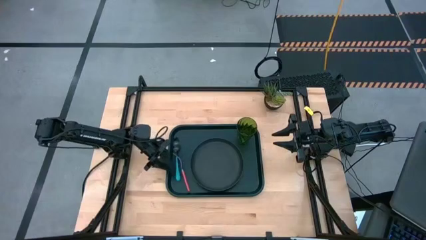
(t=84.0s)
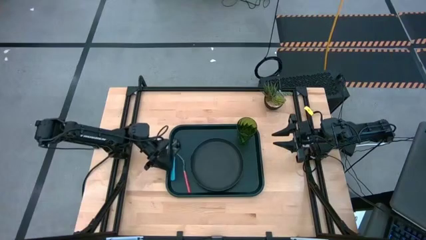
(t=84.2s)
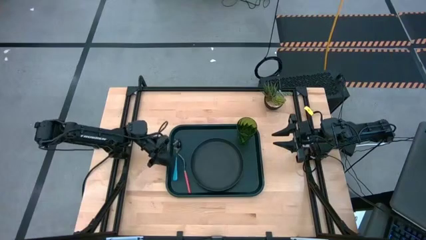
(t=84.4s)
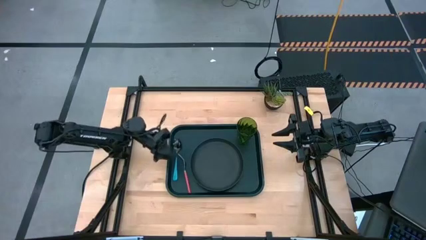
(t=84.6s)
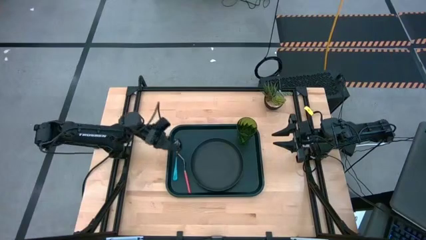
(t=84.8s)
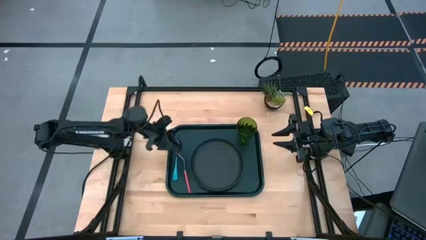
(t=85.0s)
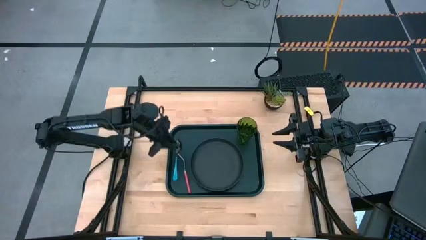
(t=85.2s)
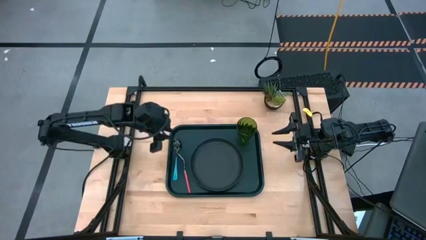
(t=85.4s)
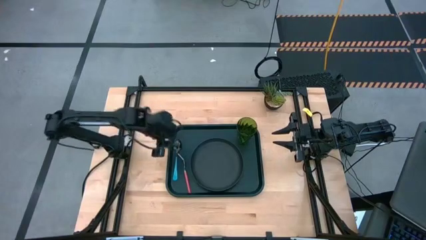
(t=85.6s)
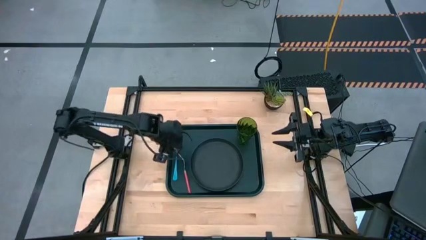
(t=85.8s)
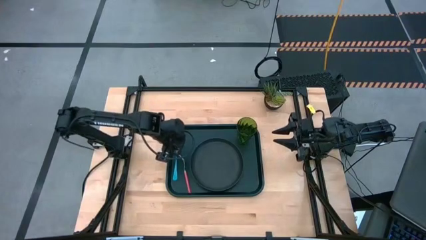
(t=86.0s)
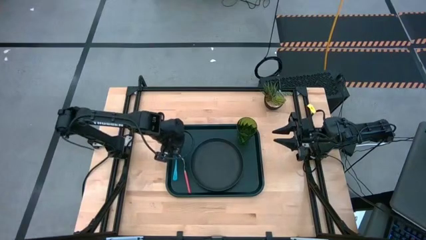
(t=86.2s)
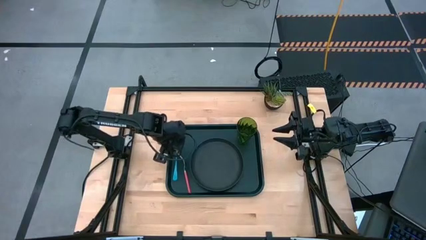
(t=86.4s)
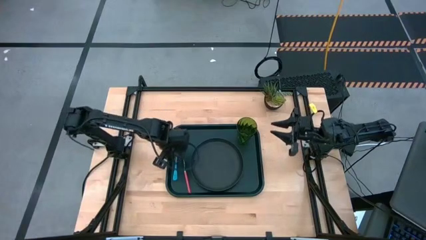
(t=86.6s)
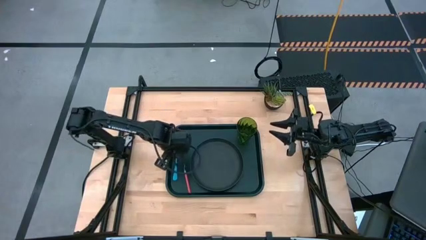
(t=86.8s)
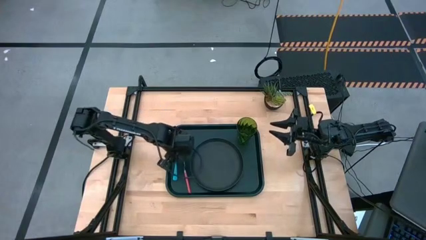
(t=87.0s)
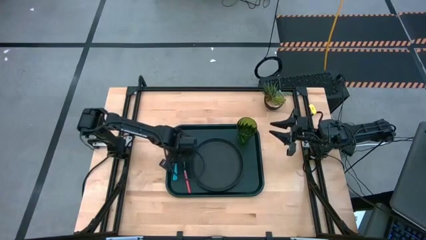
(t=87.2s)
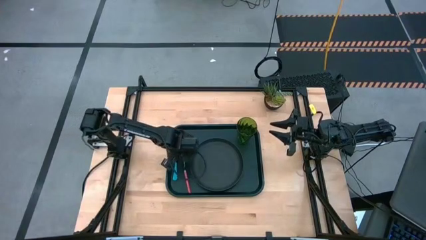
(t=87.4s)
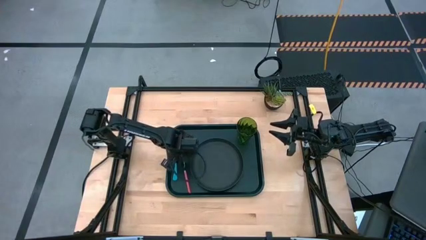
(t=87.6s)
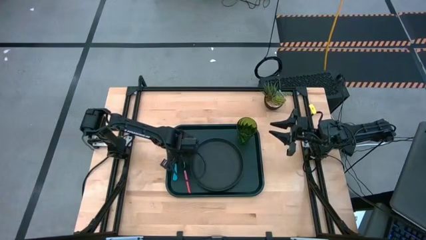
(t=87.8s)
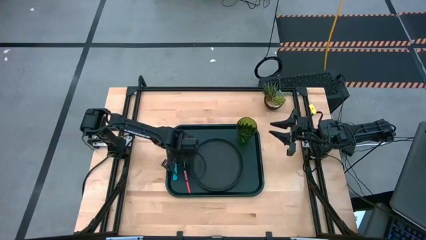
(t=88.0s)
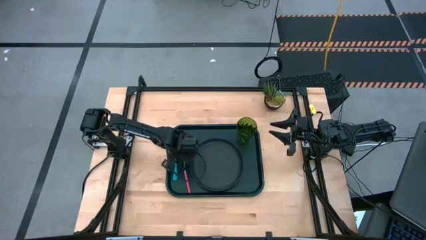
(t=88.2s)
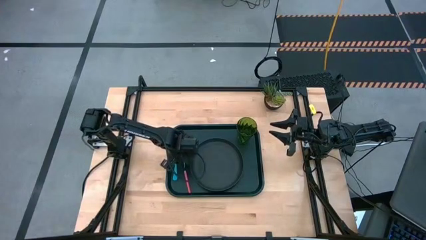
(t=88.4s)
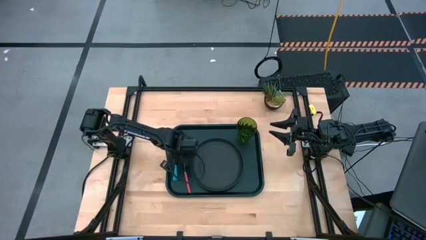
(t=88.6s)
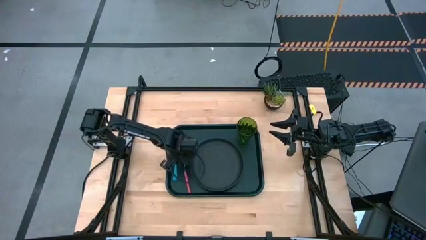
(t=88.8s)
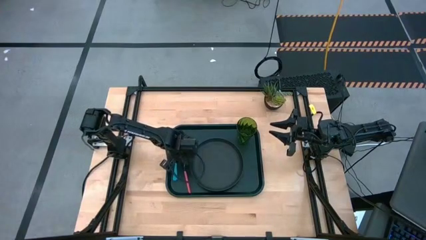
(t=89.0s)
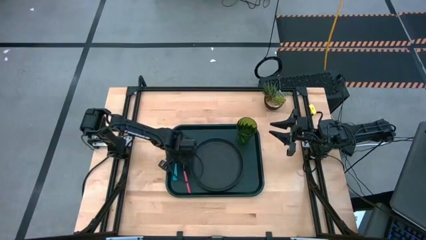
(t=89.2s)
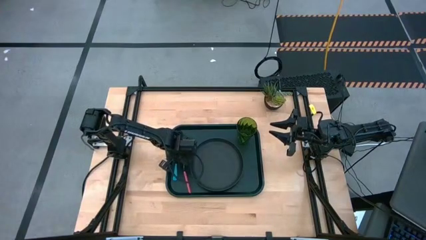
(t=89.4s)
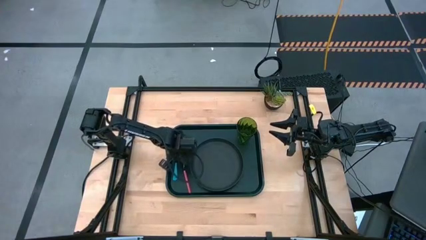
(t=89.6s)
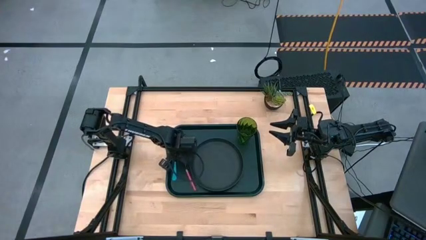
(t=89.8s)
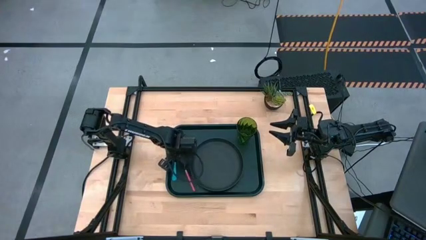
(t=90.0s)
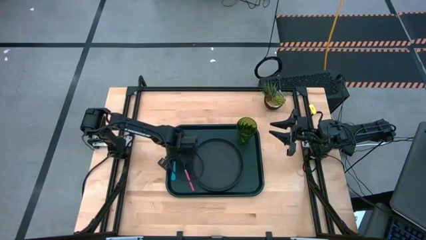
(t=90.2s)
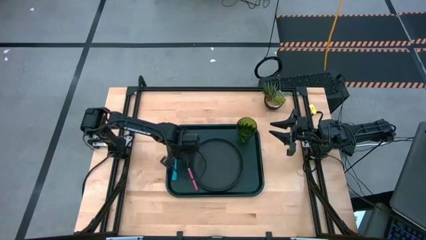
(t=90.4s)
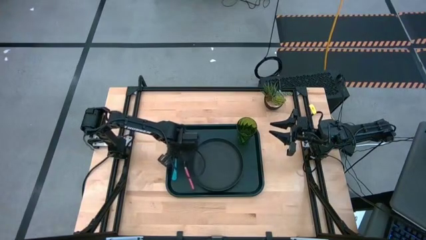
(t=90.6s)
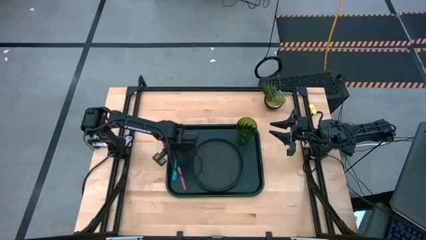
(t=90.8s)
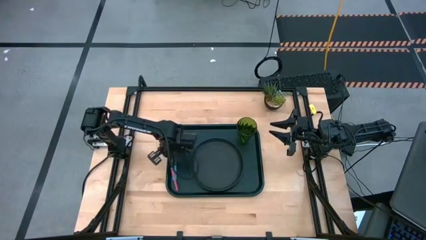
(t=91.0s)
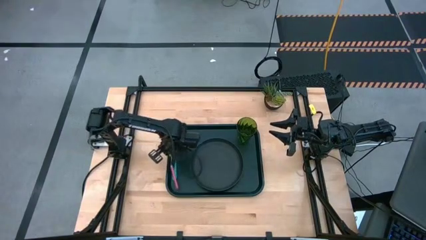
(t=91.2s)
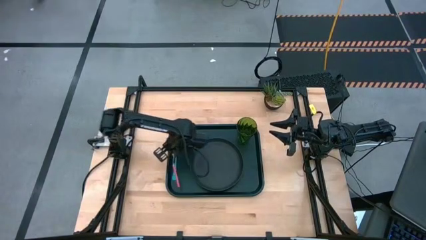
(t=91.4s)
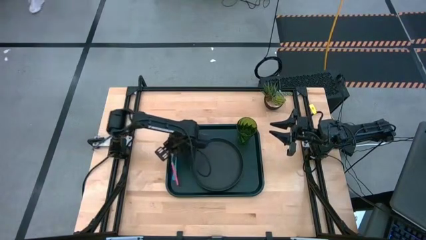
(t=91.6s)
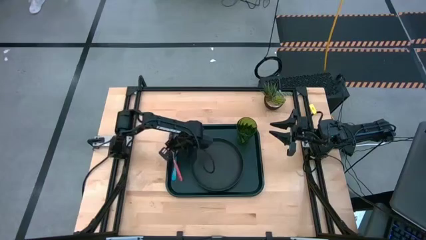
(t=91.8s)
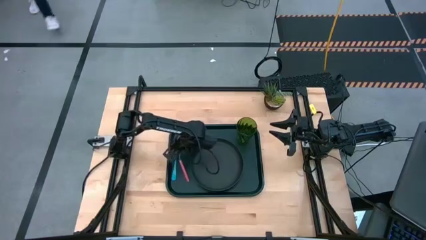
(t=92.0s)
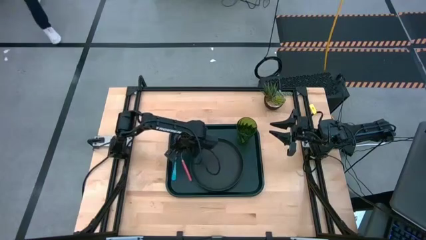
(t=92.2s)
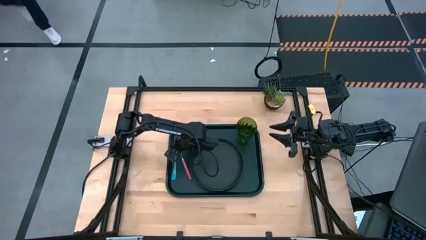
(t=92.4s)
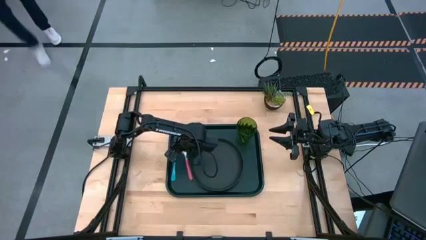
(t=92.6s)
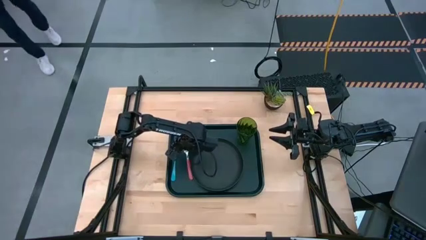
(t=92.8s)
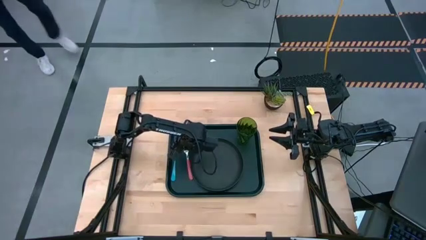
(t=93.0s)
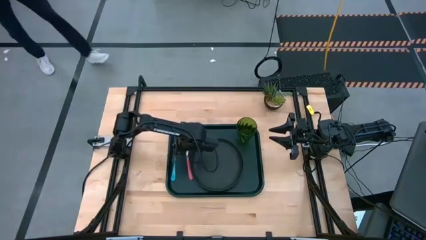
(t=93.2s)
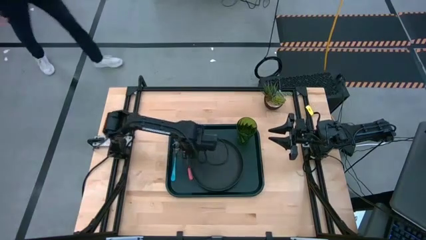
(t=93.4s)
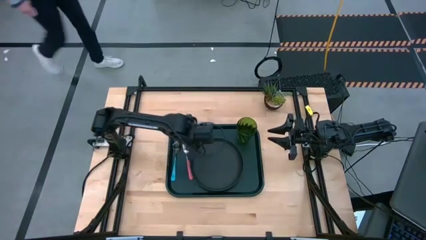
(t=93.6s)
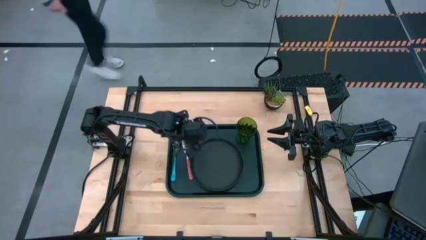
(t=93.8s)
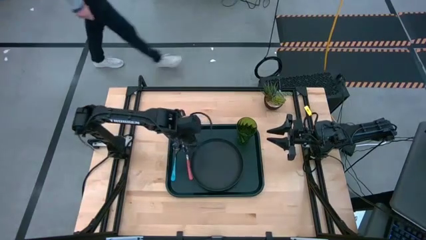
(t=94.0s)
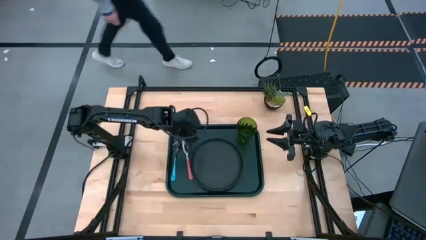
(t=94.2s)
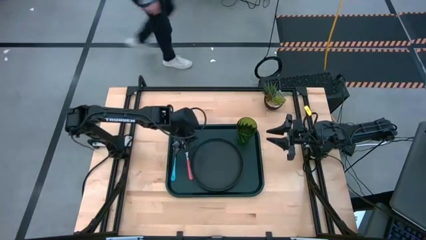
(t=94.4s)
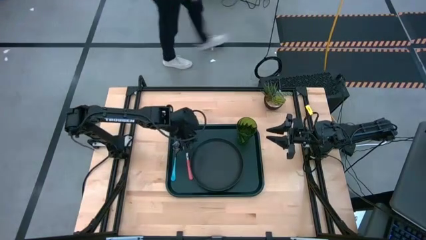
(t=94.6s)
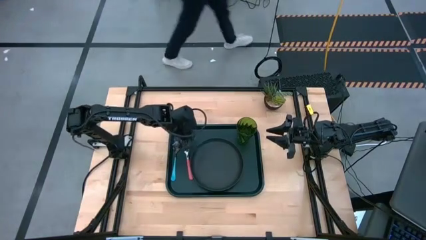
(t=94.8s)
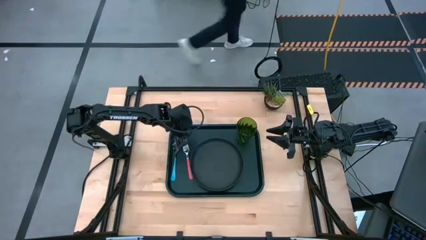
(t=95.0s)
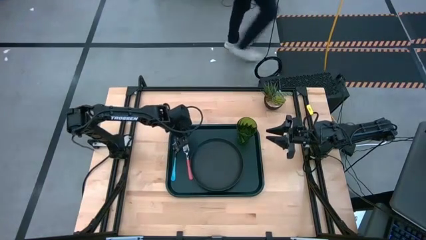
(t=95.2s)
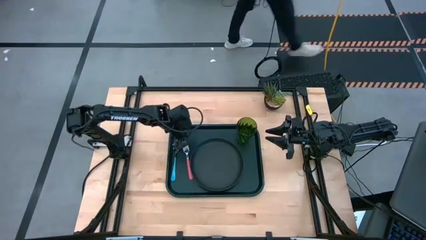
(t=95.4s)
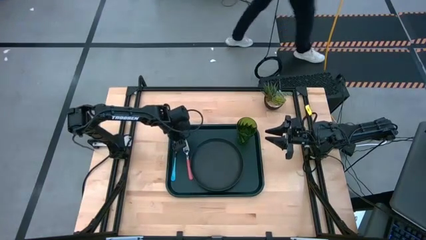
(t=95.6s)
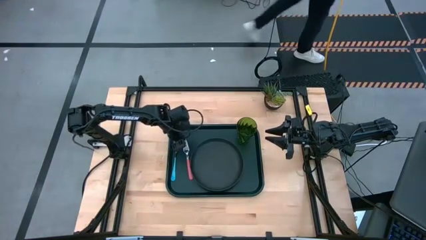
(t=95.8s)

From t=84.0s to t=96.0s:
Task: Pick and place plate/cup/fork/spoon on tray
Adjust the pink fork

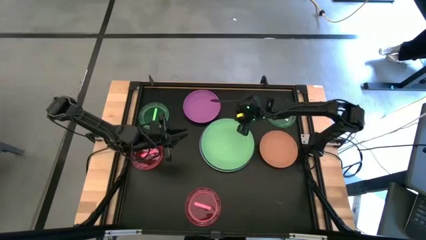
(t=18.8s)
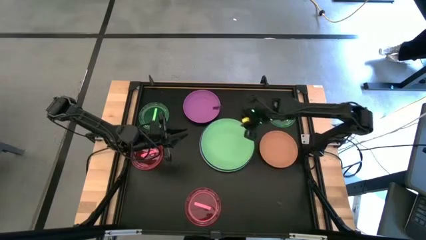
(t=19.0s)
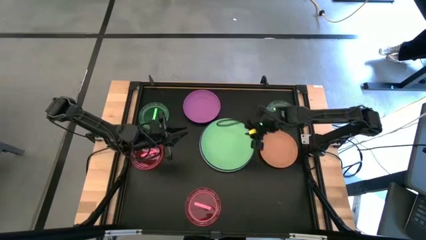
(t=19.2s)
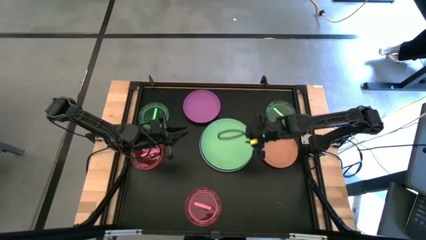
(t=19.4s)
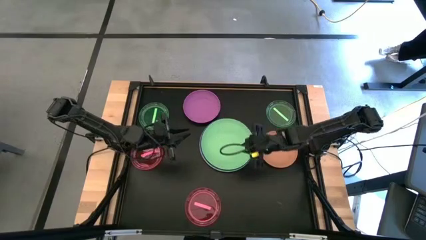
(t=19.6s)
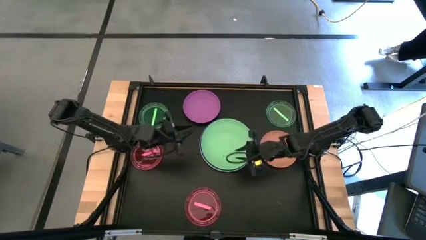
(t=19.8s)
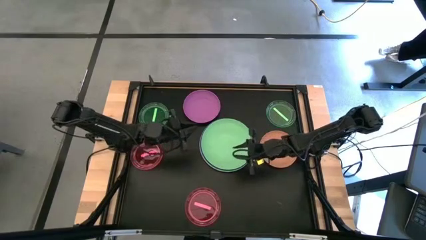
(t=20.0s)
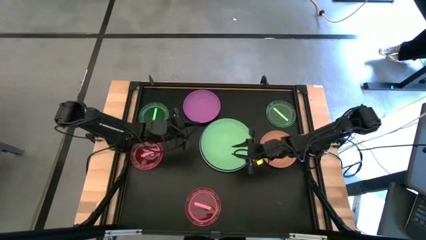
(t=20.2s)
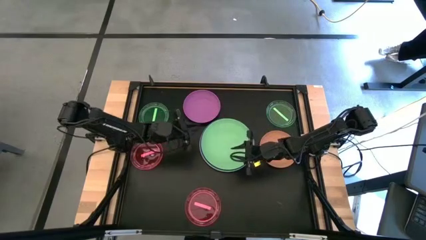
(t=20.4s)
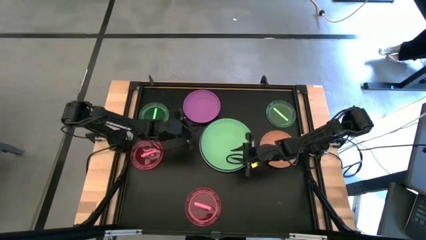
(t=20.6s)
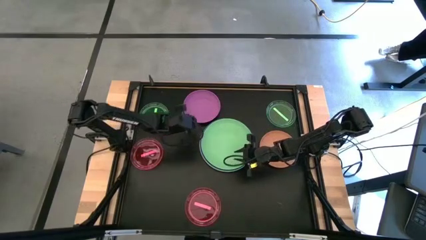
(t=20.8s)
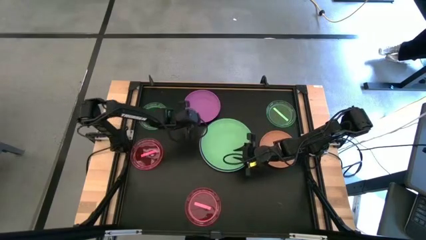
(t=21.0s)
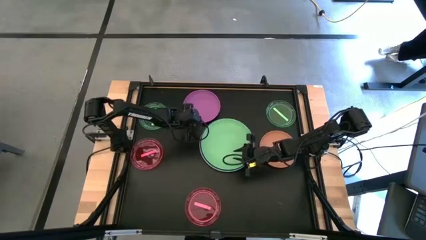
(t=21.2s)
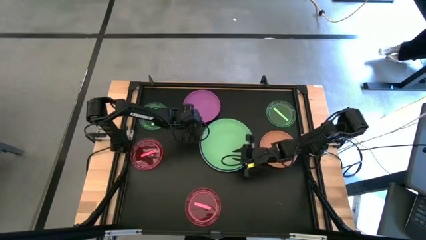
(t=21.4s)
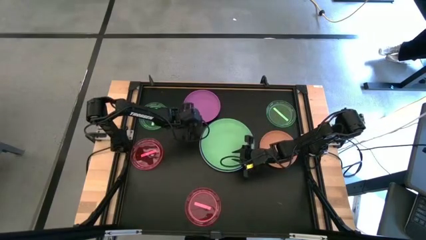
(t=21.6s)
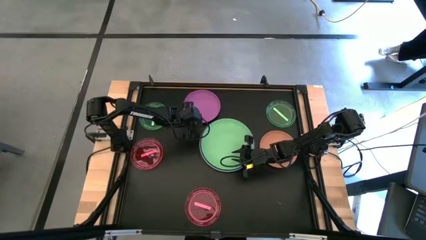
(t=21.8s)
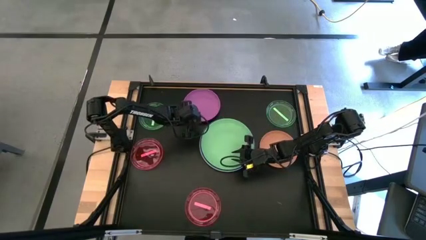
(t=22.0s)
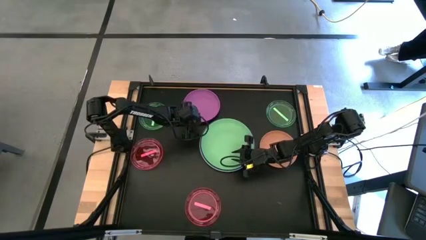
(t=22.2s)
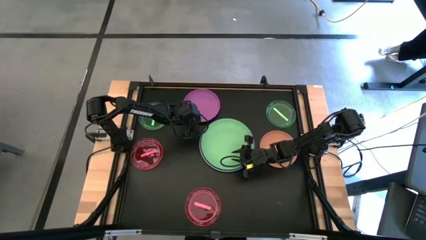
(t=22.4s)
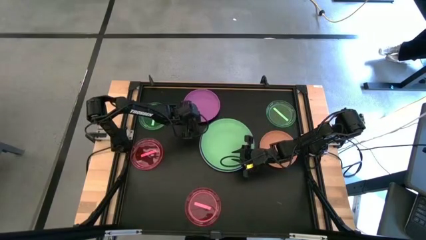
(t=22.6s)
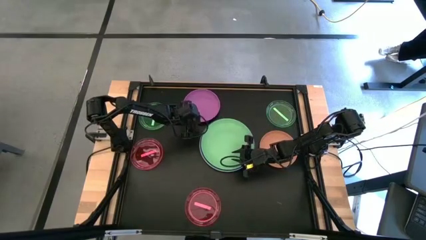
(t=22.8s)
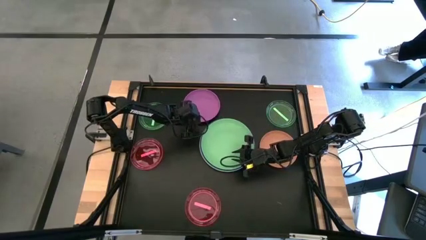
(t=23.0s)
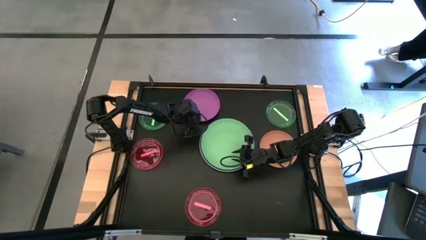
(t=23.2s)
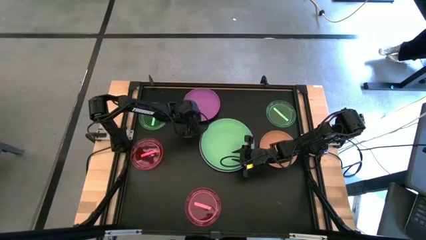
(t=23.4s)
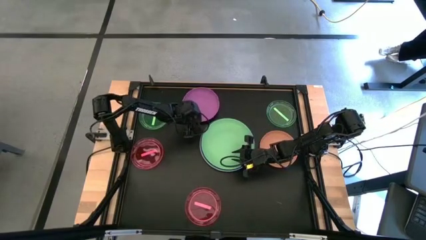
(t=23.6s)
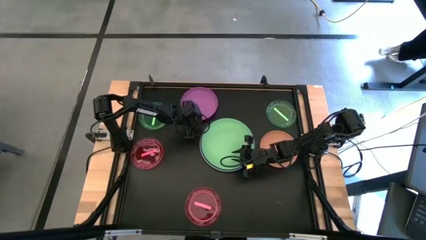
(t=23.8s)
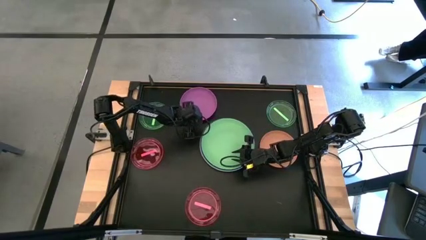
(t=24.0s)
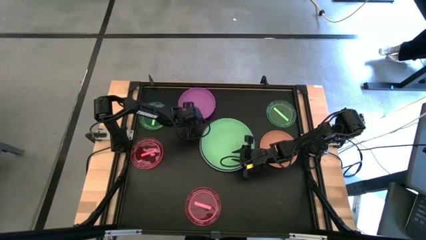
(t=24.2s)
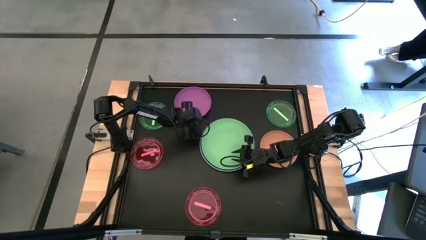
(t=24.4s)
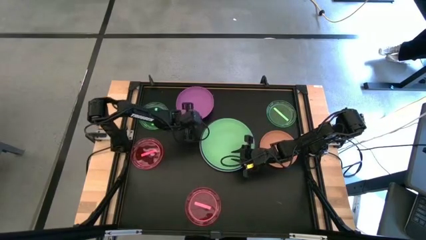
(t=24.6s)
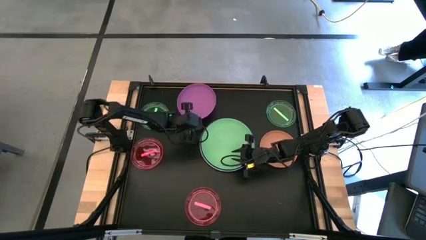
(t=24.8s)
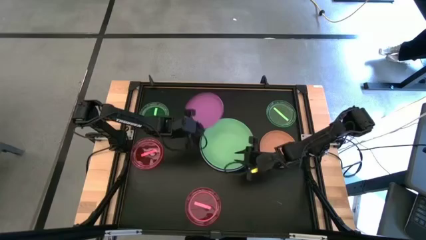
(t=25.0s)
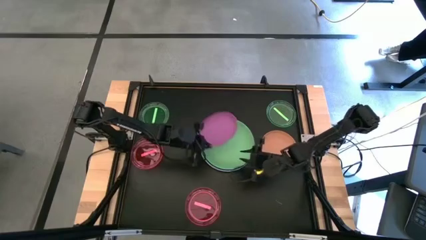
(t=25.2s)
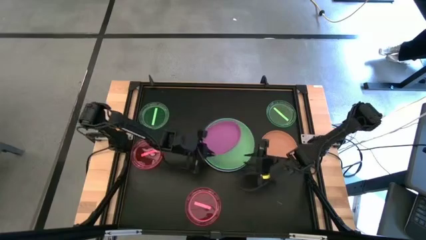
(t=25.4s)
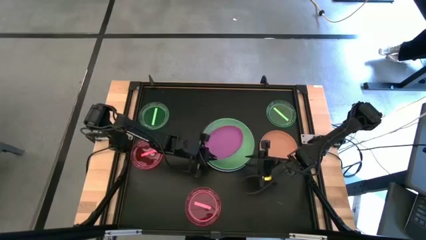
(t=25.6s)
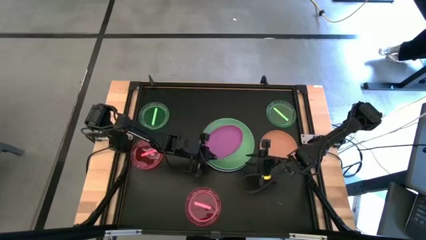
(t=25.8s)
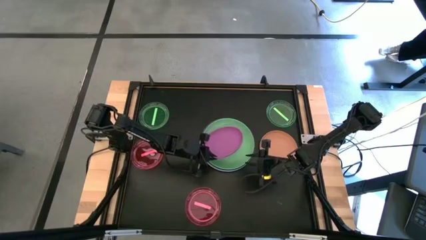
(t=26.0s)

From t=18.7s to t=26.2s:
Task: Stack plastic plates
Stack the small pink plate on the big green plate
